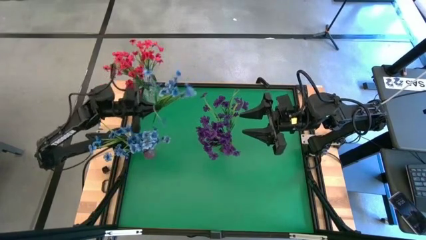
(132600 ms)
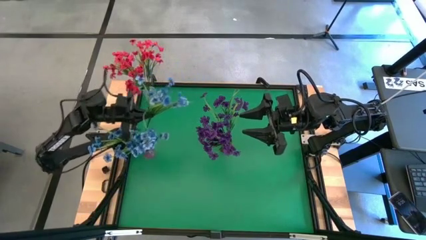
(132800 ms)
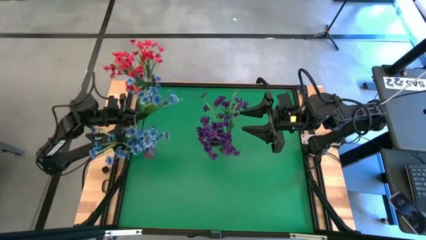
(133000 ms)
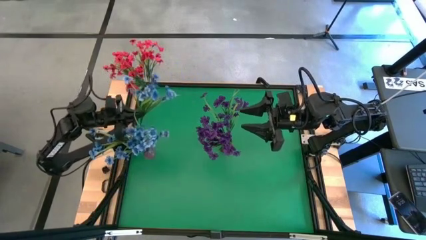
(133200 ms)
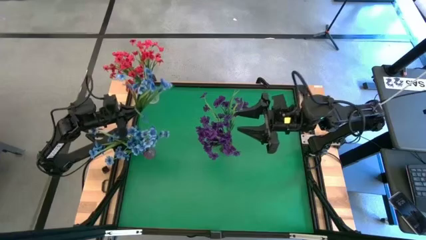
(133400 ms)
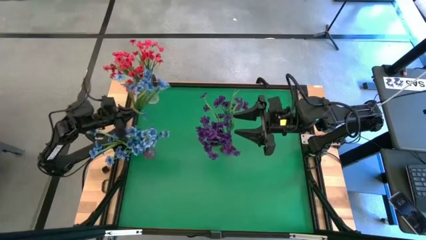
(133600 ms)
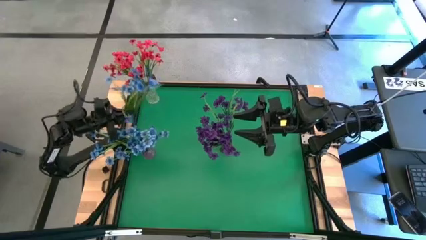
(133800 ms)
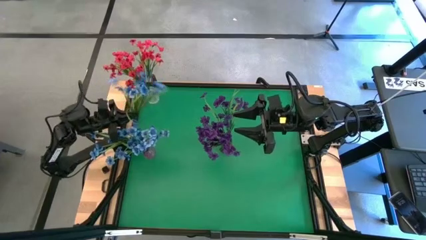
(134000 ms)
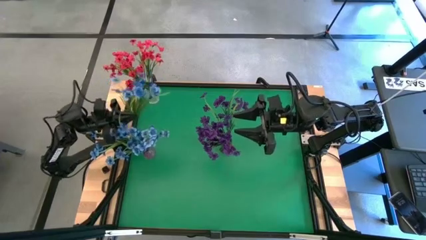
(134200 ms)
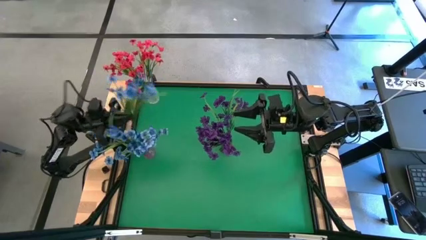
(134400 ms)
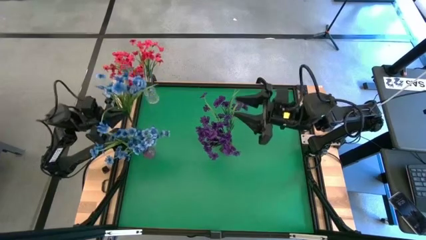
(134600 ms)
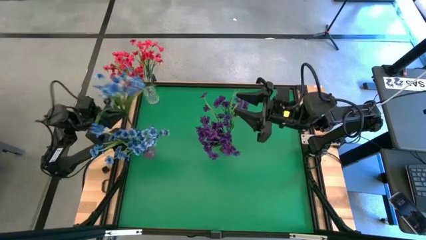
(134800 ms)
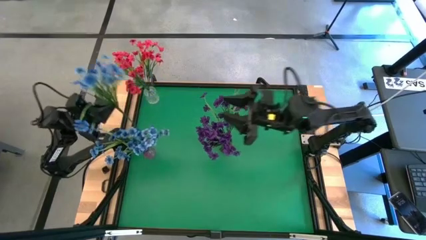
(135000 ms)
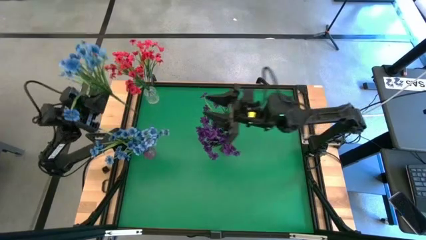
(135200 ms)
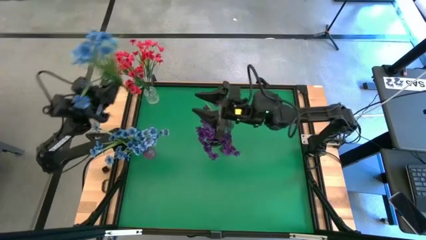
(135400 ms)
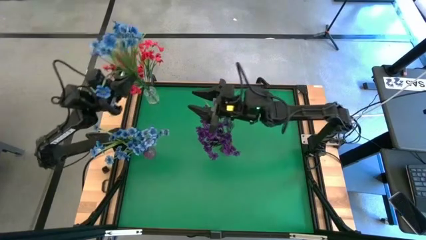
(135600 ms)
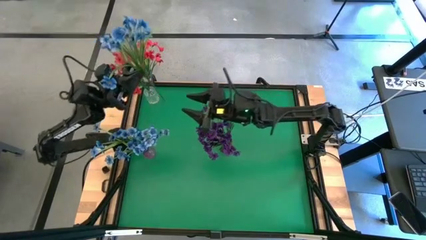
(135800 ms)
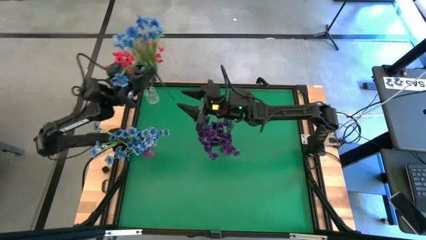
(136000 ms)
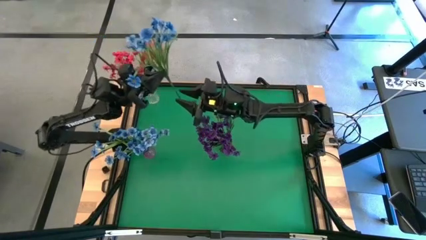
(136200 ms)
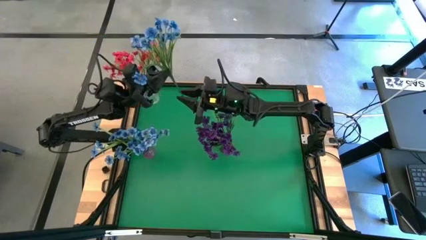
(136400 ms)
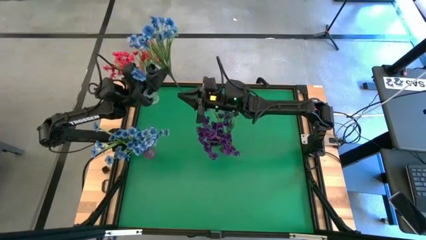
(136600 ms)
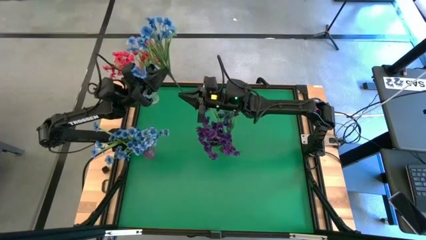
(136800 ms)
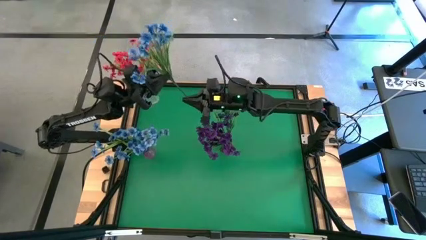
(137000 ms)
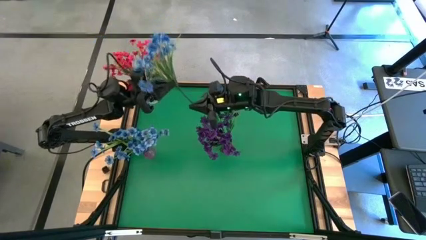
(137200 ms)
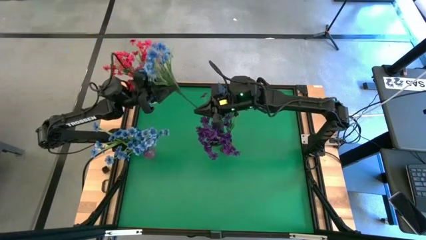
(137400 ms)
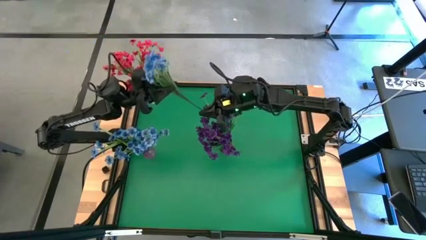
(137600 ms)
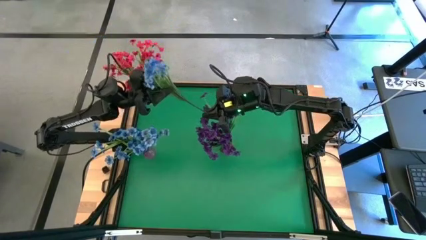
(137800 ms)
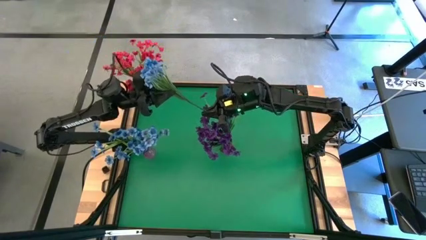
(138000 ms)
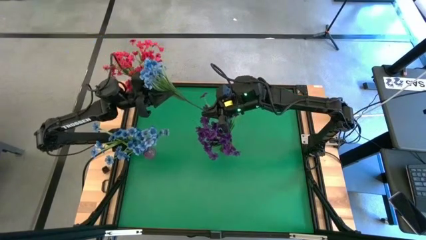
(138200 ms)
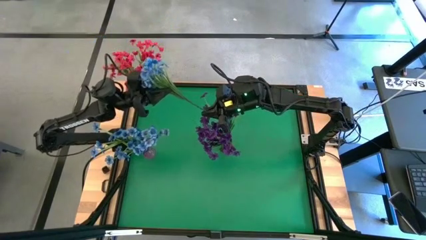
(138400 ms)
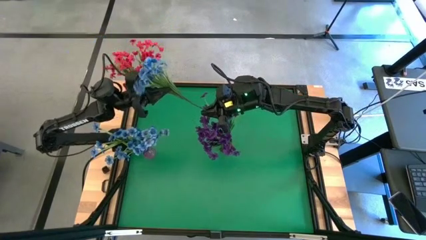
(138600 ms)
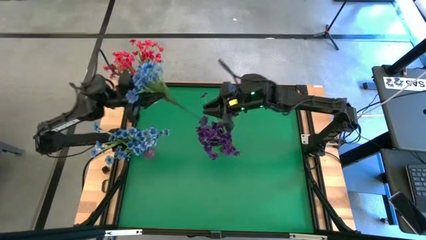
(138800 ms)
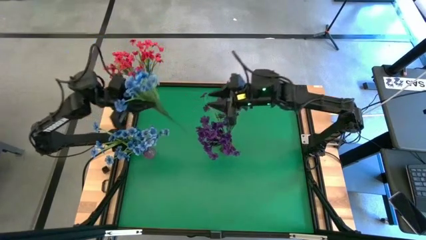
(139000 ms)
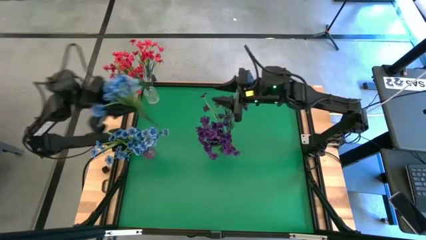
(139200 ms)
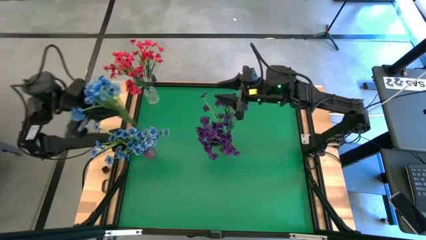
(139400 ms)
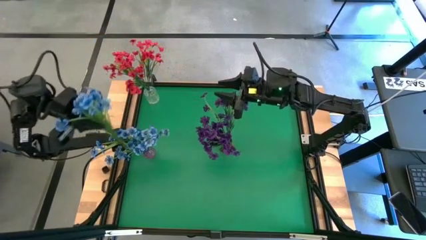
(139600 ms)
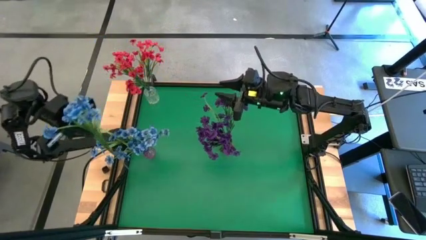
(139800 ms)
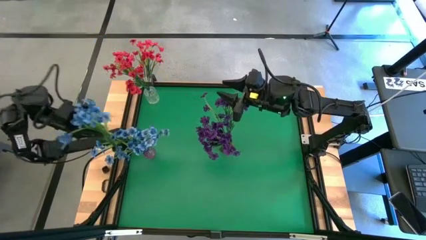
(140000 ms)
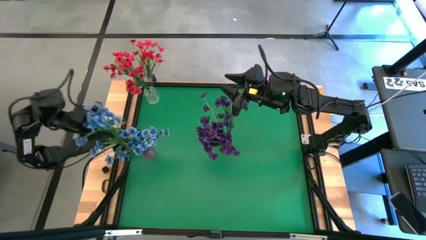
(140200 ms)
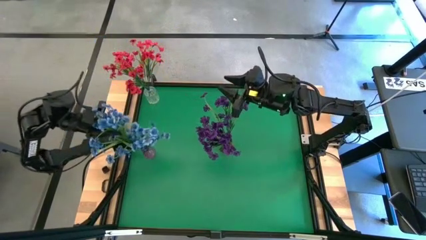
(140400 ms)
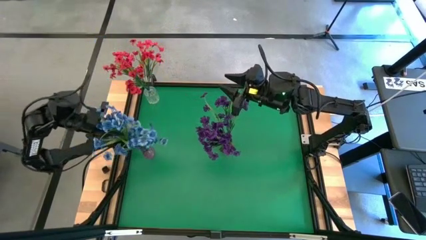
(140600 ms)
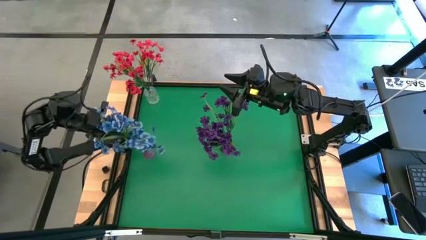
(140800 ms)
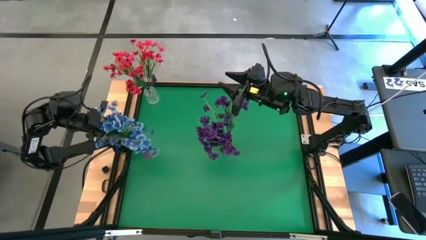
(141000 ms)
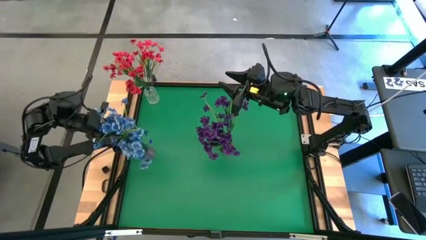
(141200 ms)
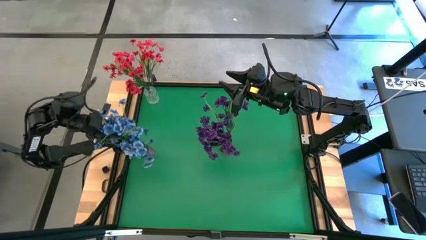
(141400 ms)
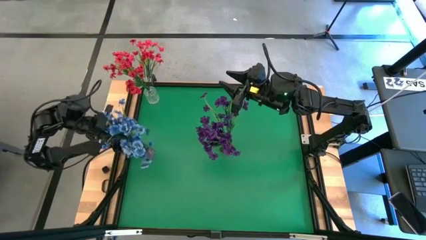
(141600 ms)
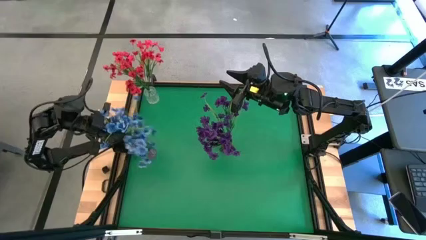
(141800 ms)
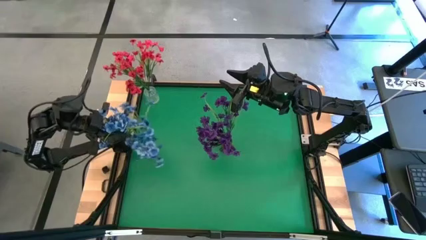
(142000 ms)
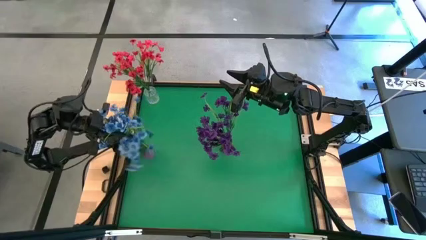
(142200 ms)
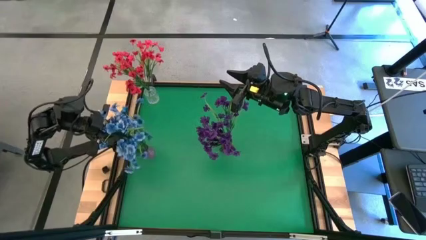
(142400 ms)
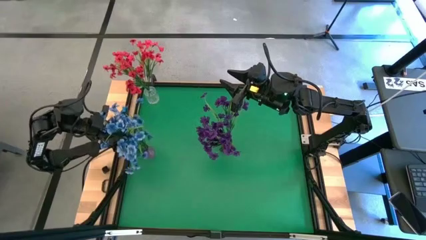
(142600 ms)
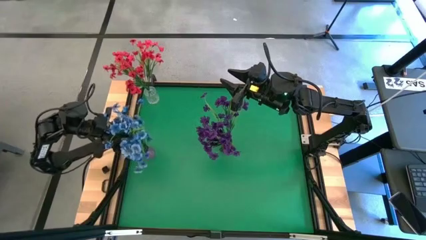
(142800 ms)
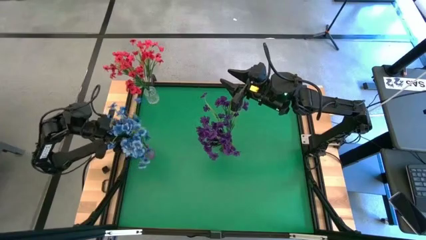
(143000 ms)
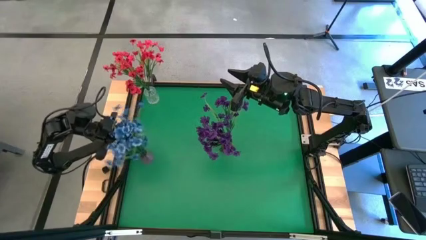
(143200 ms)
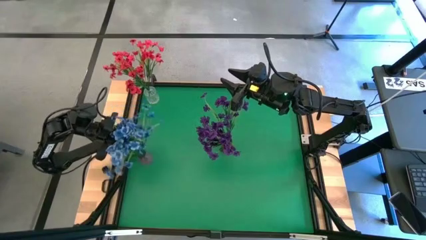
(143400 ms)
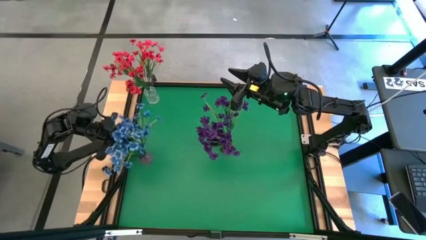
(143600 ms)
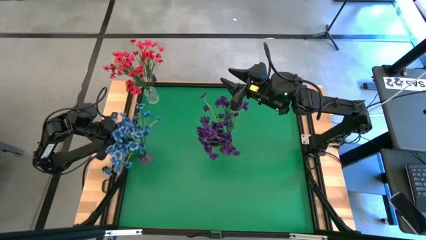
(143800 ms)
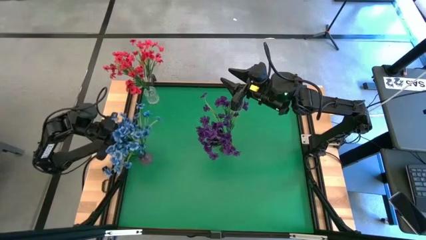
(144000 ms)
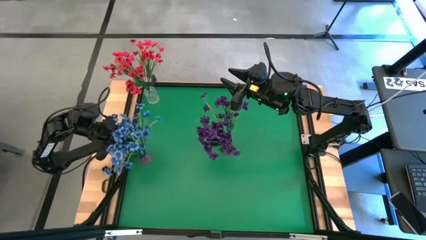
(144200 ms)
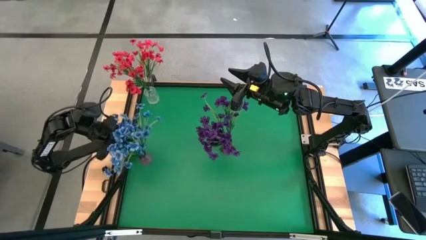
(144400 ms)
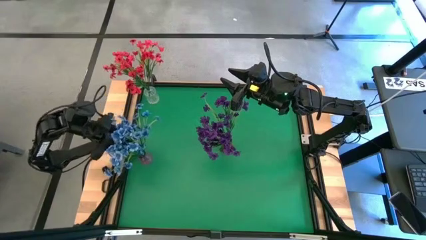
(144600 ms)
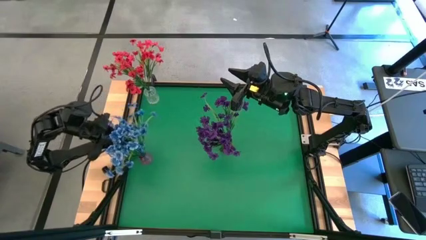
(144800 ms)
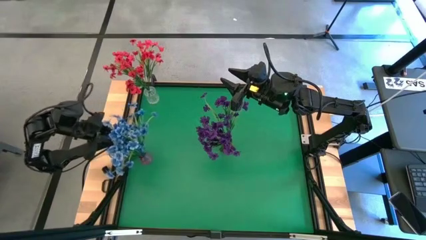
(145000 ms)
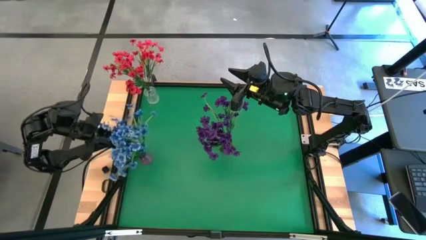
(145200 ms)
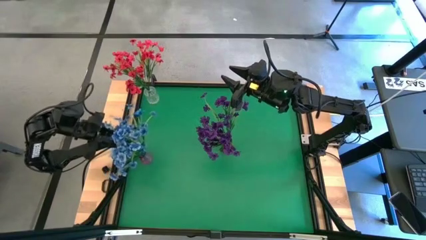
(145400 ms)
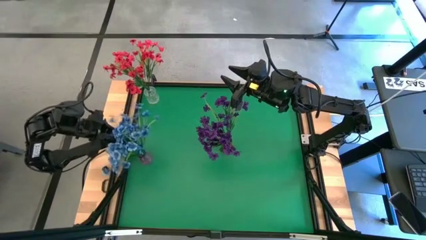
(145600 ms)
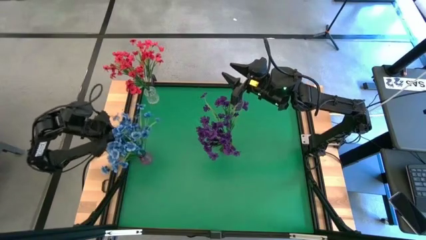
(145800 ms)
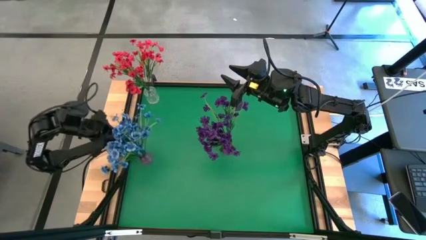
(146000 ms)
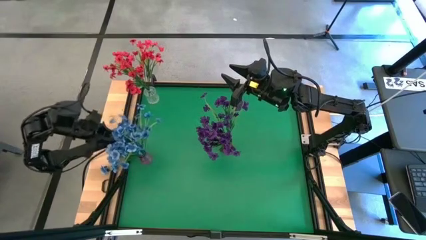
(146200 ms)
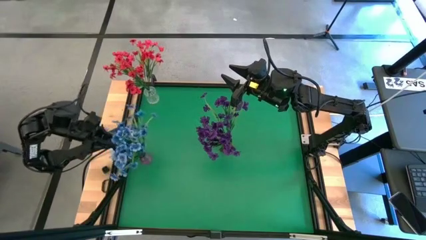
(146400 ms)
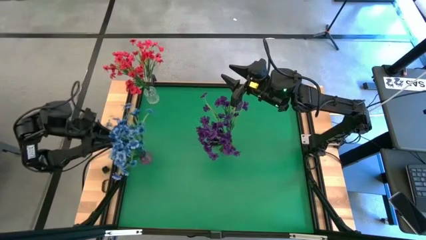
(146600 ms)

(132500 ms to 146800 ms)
Task: Sort flowers into vase by color
Put the blue flowers into the violet vase

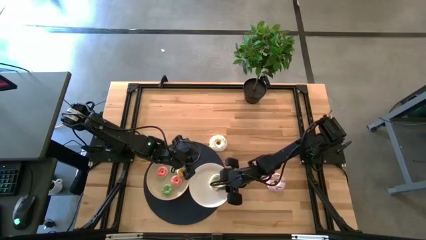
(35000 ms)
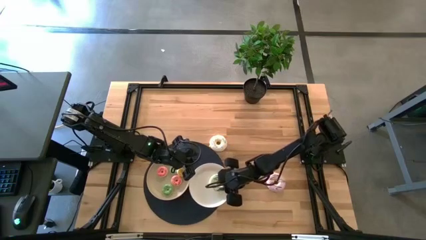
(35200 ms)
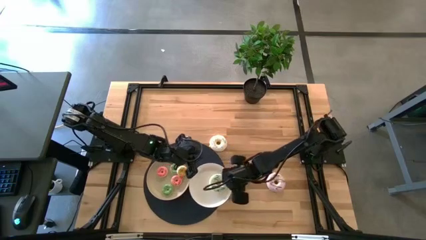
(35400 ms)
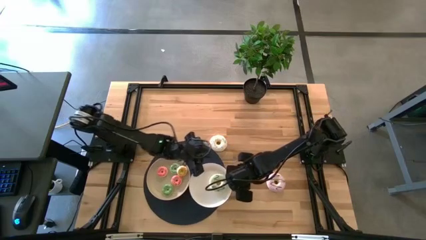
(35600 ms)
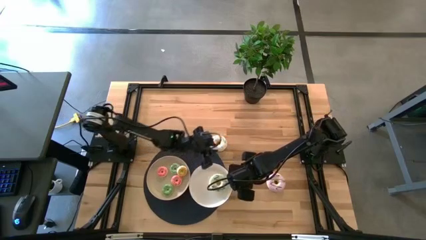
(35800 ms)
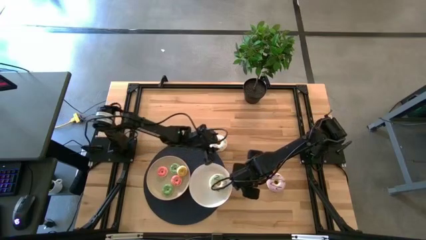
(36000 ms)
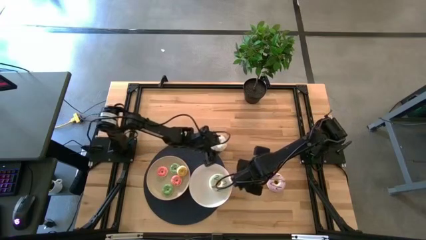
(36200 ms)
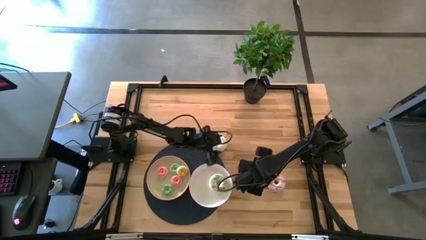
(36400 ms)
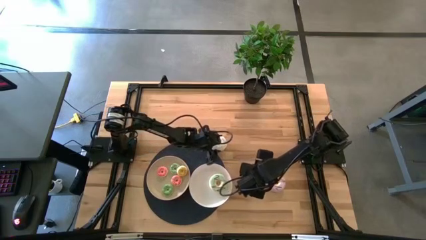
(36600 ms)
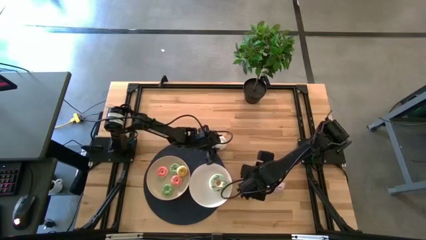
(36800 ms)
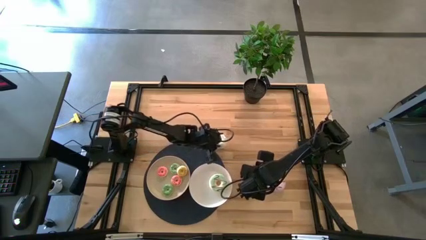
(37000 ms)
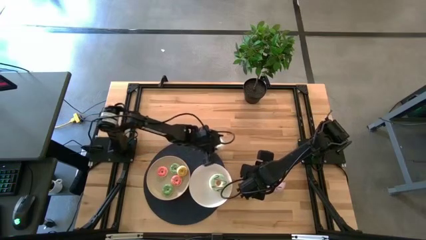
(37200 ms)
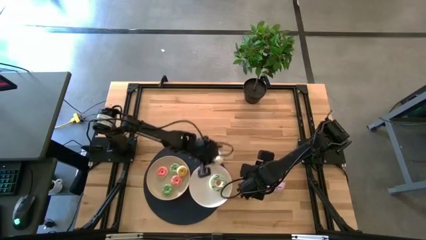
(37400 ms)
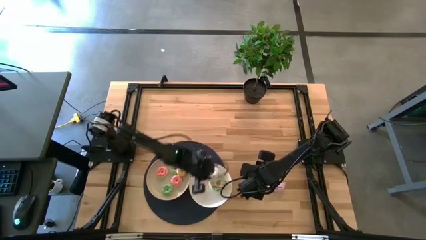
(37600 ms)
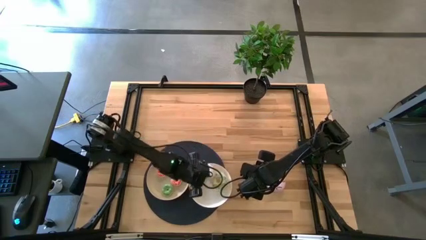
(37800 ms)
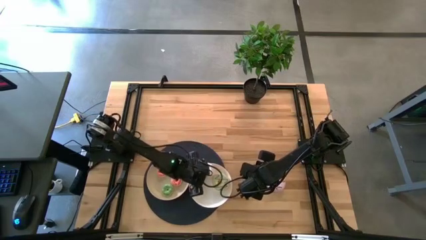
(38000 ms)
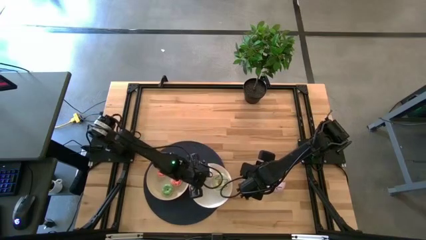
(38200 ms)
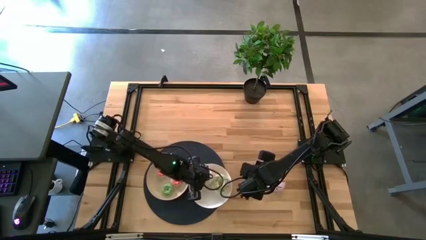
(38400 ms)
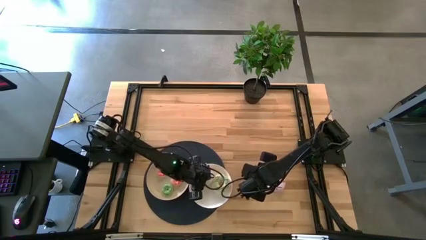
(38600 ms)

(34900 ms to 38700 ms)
Task: Pick & Place donuts
Put the big blue donut on the right white plate
